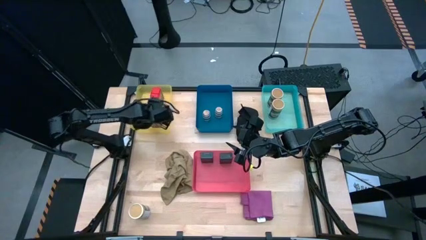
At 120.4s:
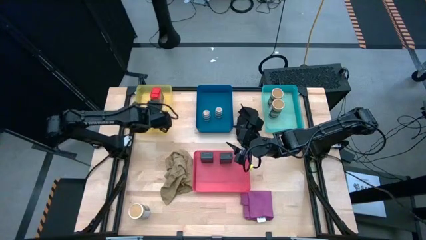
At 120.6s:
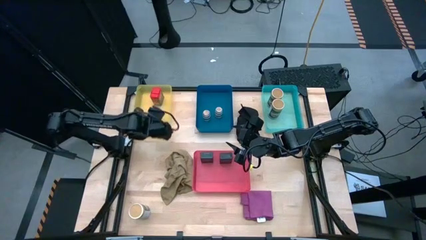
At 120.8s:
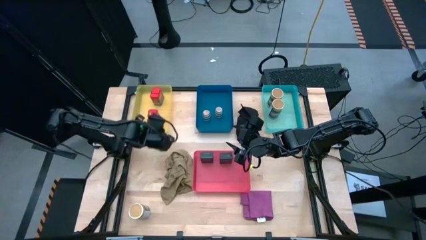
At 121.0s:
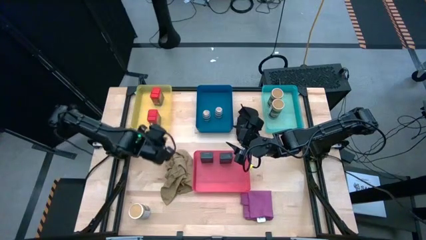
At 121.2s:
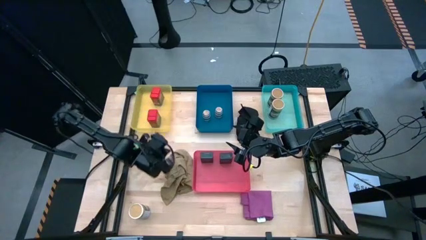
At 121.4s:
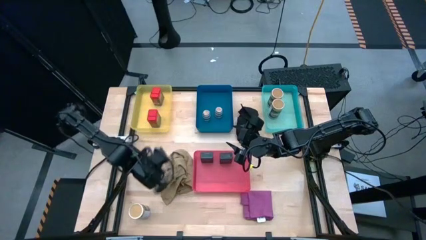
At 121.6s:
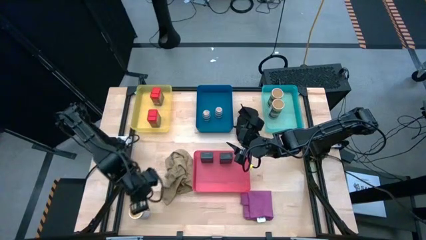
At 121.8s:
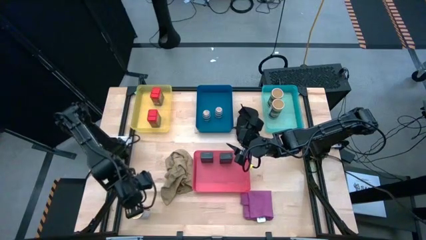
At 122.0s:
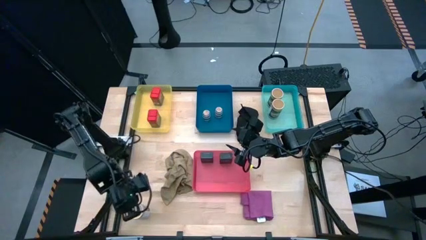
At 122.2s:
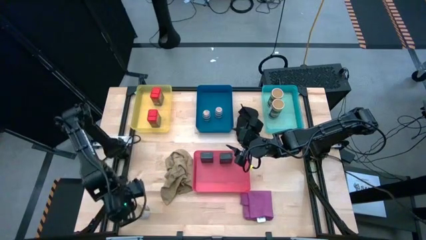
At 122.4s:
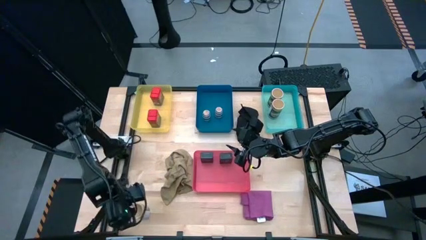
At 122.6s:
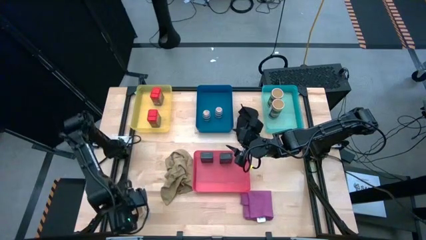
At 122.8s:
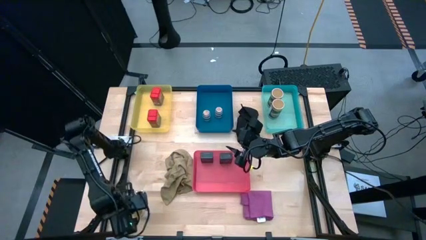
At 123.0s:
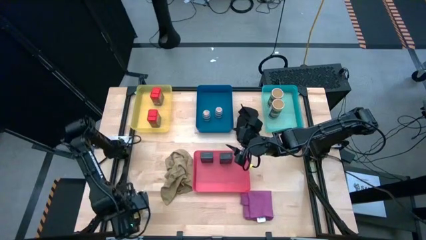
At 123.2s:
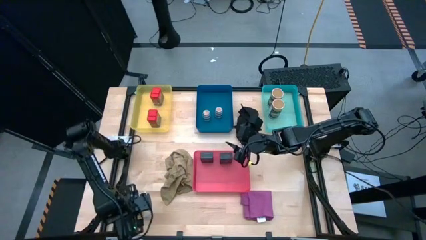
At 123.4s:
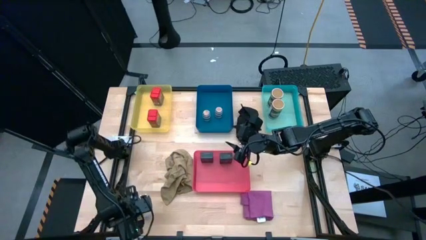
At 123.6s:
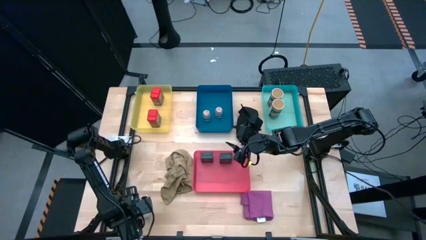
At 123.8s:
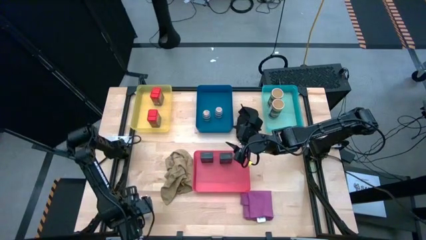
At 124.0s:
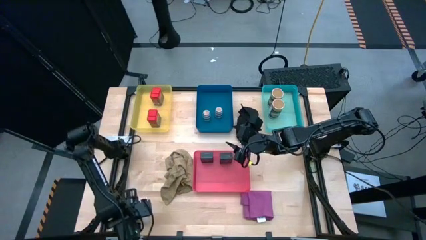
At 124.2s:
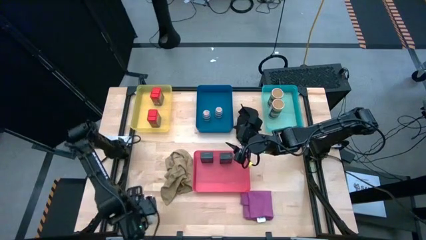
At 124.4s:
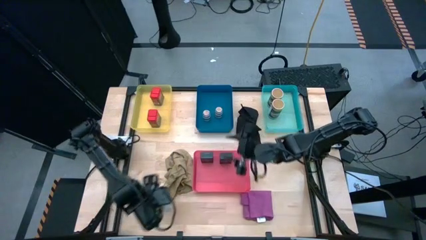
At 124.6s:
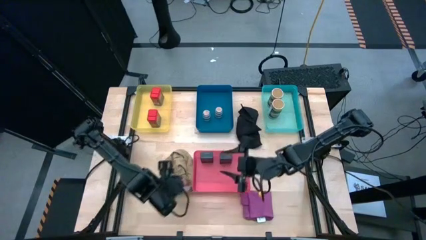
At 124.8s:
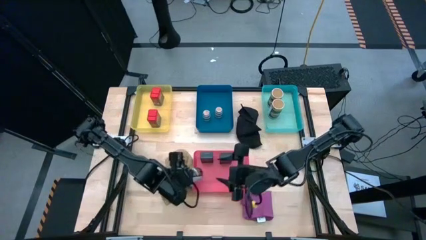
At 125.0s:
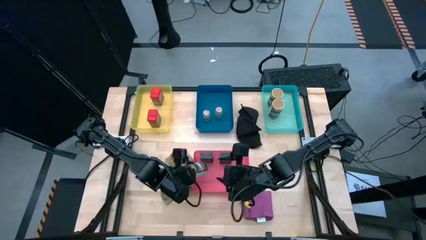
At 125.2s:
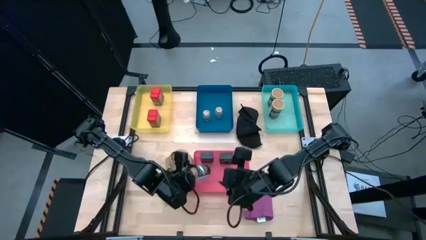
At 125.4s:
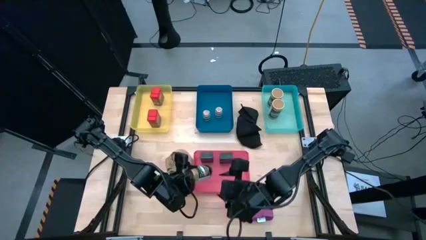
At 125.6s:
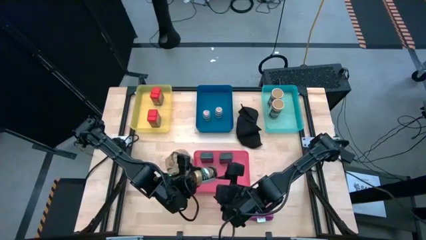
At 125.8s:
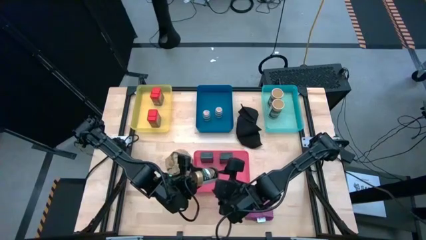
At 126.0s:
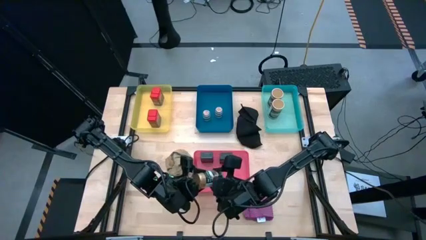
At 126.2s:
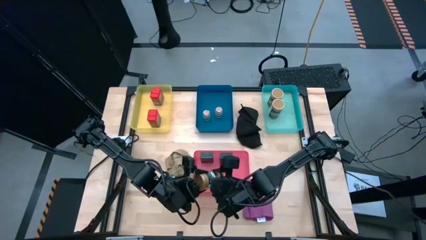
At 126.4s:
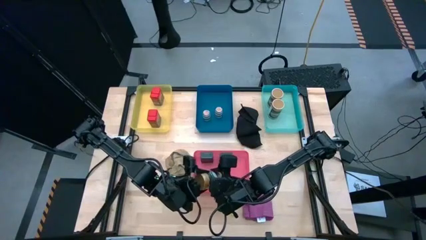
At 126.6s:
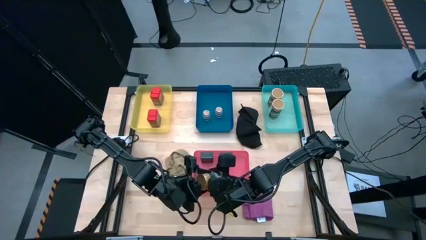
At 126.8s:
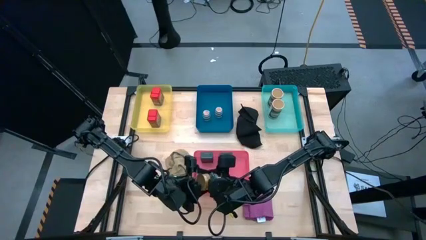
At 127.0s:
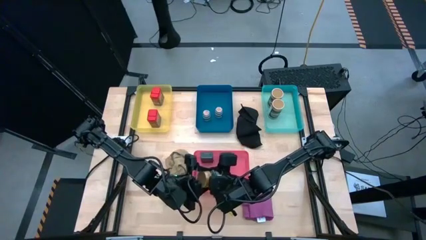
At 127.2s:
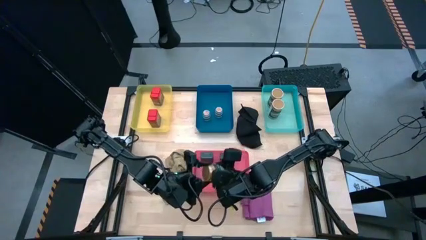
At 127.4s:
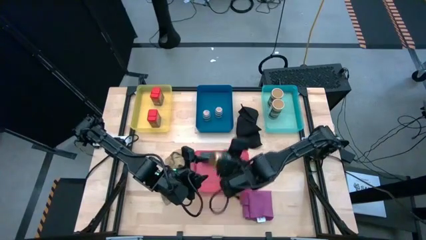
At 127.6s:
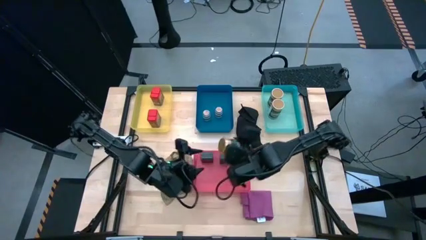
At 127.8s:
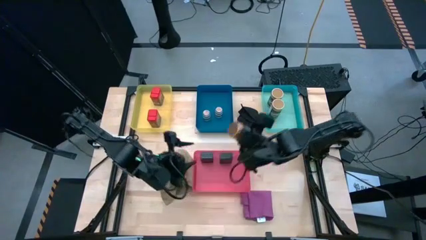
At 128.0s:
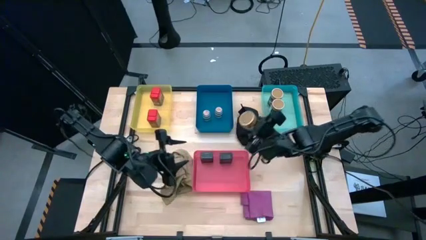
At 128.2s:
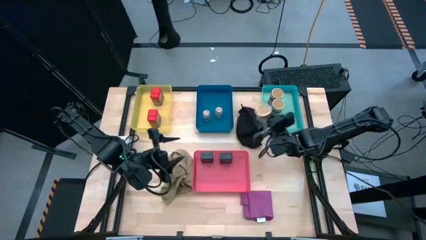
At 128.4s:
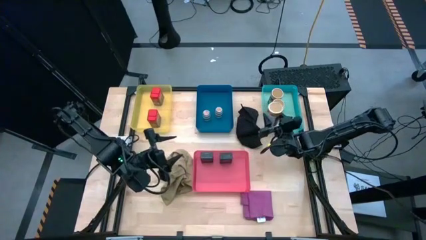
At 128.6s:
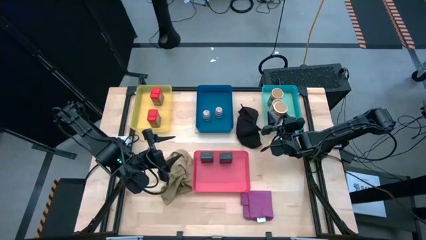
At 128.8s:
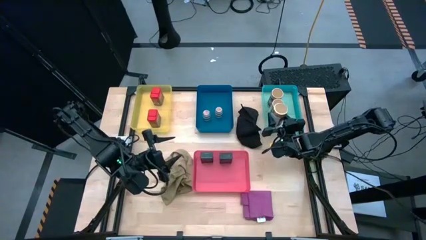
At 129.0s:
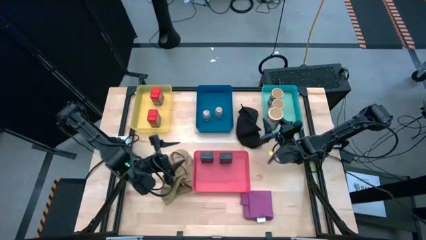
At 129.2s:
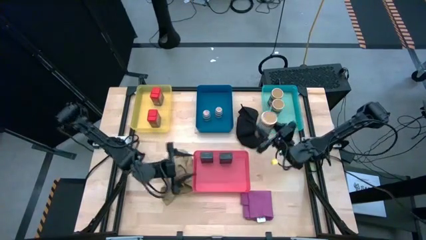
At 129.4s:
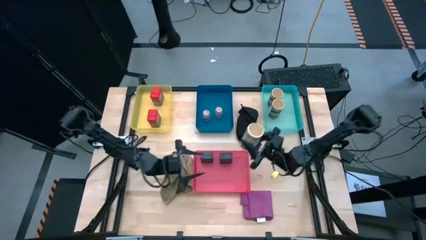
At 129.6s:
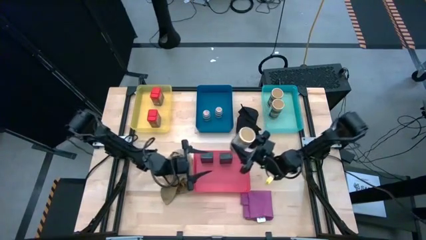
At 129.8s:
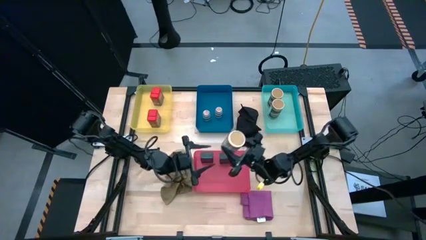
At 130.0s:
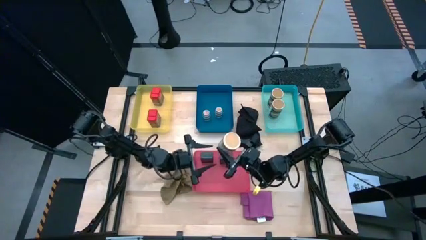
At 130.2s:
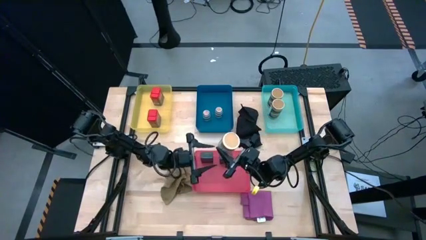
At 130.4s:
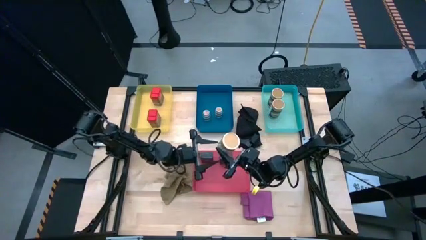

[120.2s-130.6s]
Task: Sort spices by type
Put the golden seasoning bottle into the light blue bin

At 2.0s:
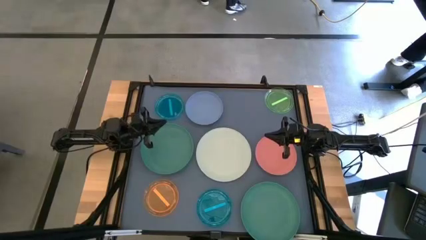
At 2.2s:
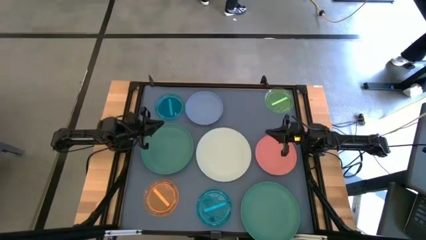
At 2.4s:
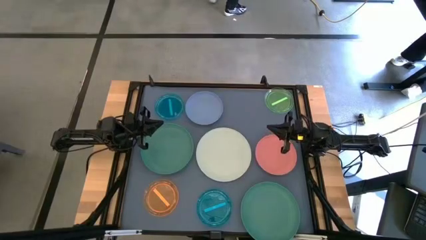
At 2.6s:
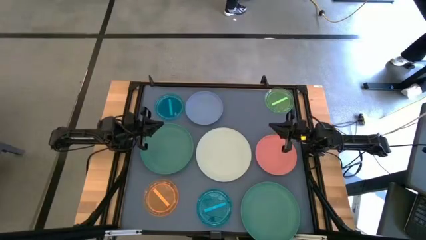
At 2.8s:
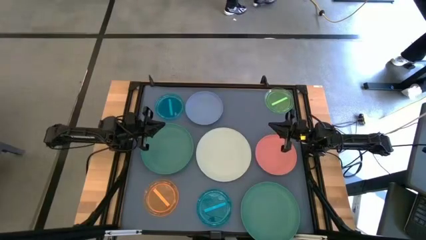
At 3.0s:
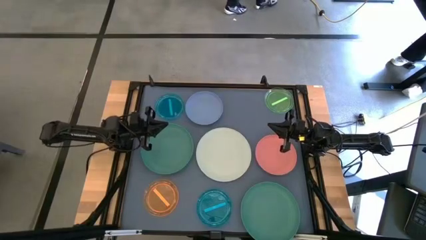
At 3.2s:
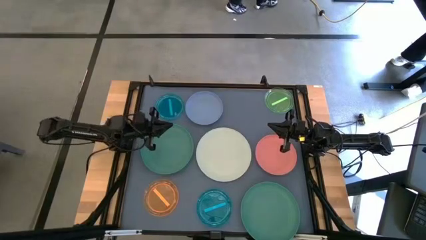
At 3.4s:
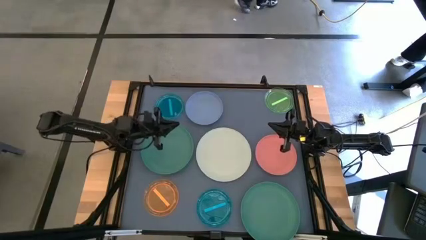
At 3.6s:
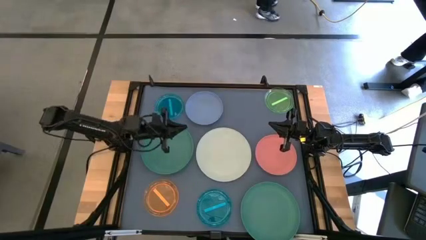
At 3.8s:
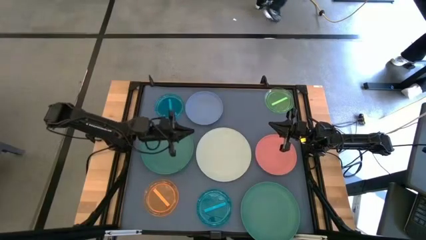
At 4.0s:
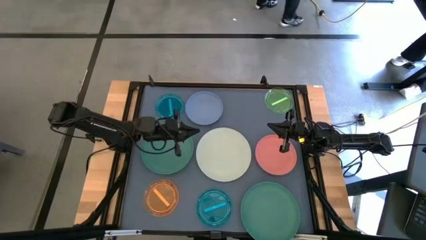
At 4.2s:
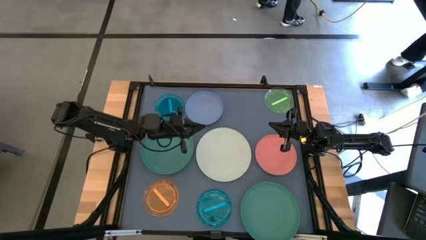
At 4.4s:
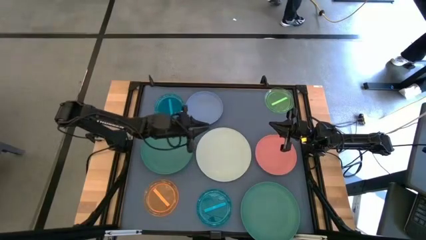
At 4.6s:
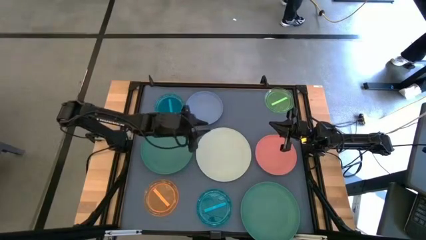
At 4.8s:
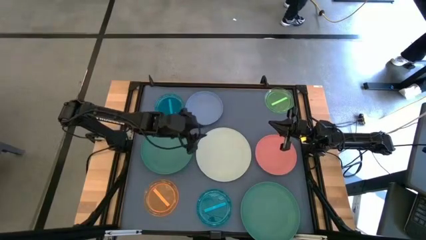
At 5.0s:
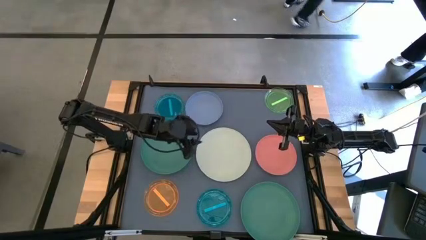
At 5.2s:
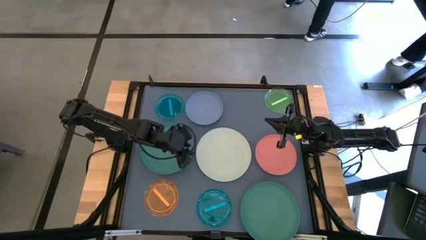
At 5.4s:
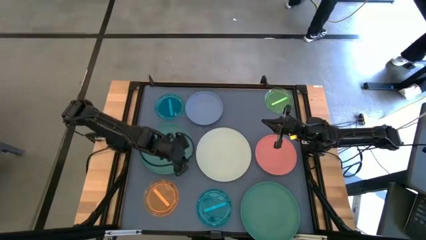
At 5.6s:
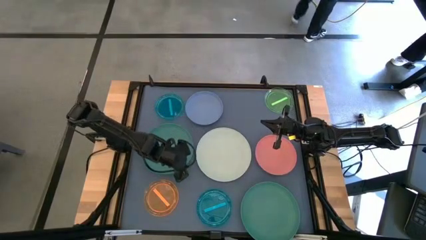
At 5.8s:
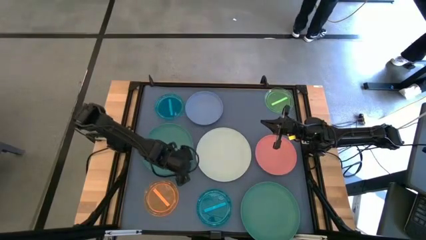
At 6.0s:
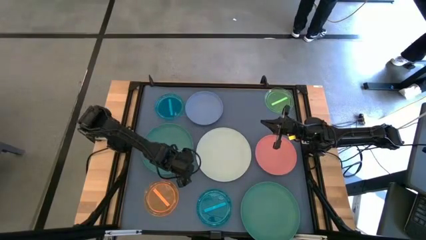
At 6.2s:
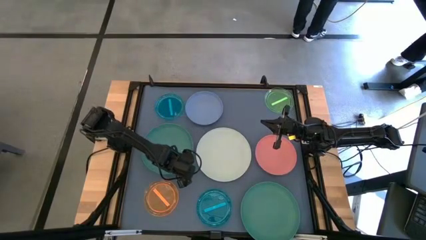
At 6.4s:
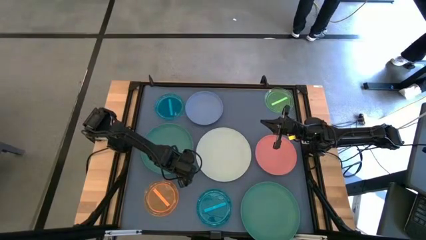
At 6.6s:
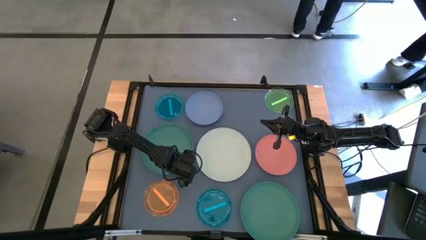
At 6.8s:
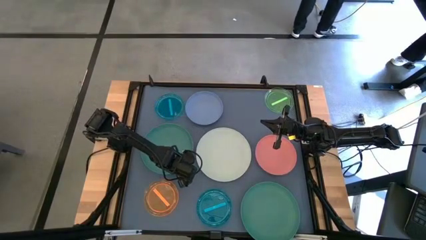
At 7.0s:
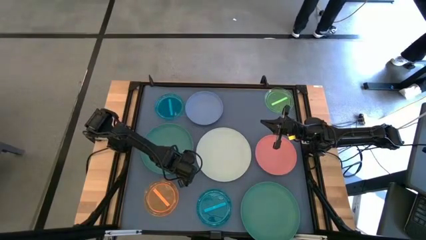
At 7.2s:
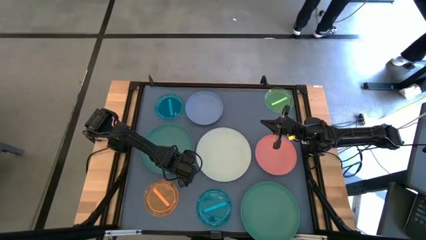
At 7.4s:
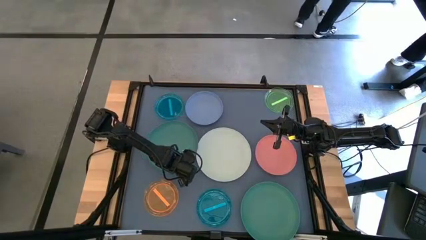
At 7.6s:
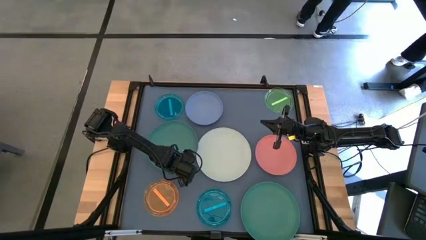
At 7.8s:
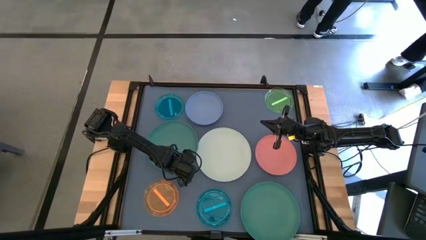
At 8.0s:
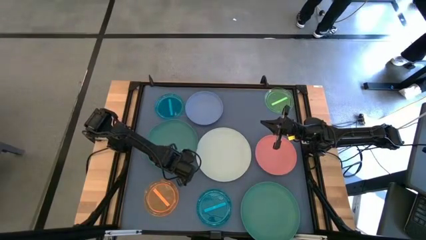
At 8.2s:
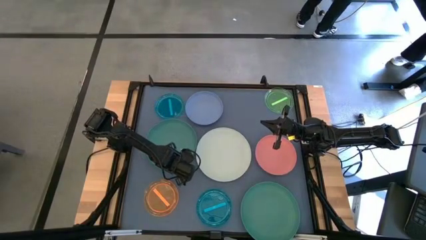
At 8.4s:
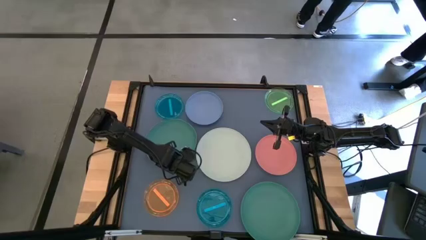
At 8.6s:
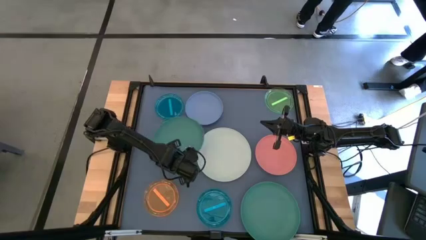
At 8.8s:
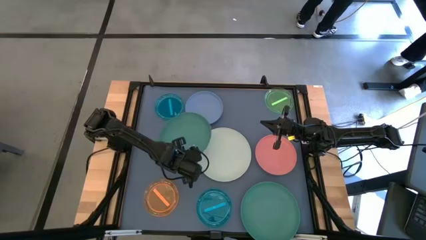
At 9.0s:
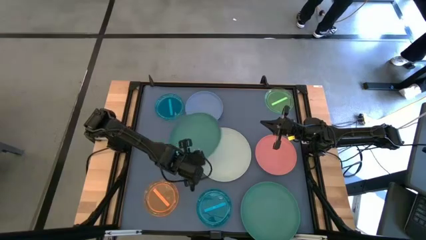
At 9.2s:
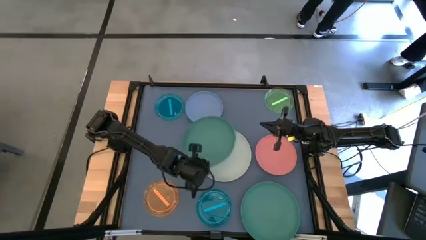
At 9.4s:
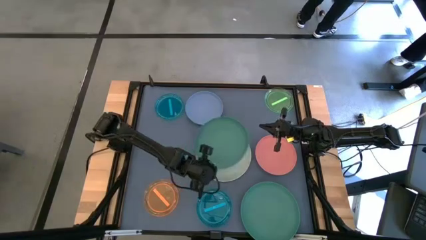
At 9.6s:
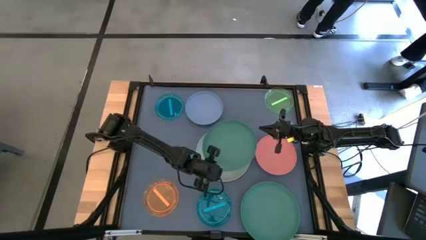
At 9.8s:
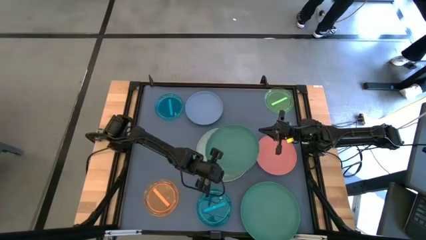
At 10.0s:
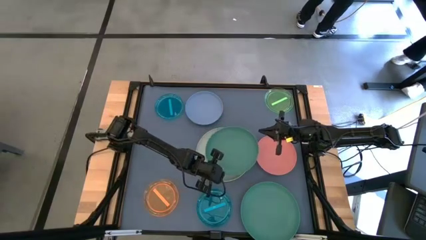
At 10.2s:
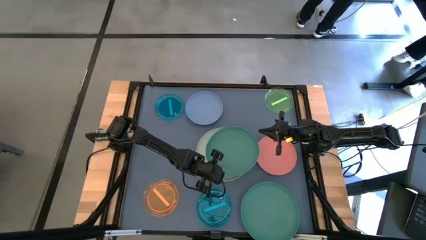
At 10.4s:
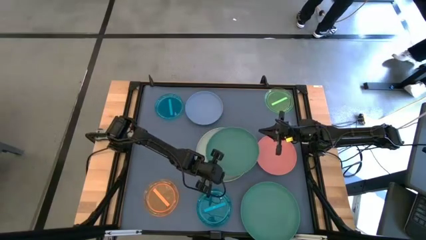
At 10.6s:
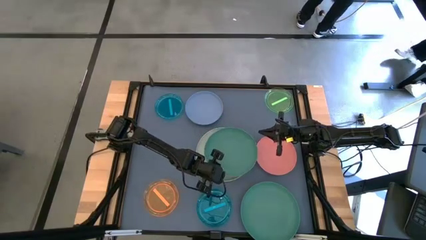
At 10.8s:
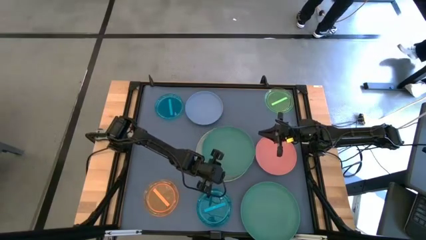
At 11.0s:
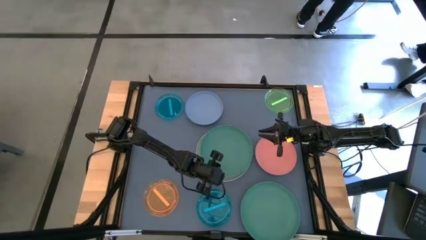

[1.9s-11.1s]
Task: Stack plastic plates
Stack the top green plate on top of the white plate
